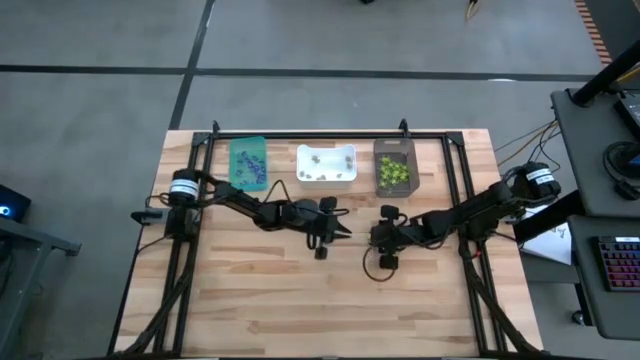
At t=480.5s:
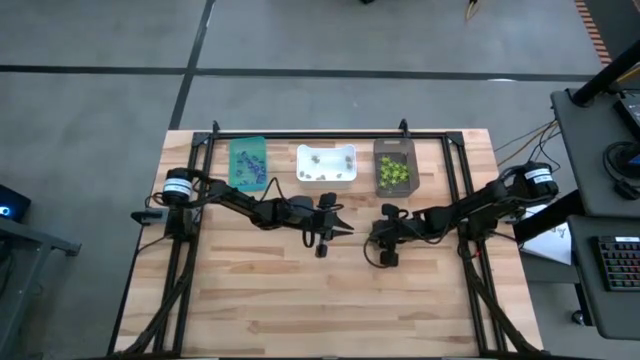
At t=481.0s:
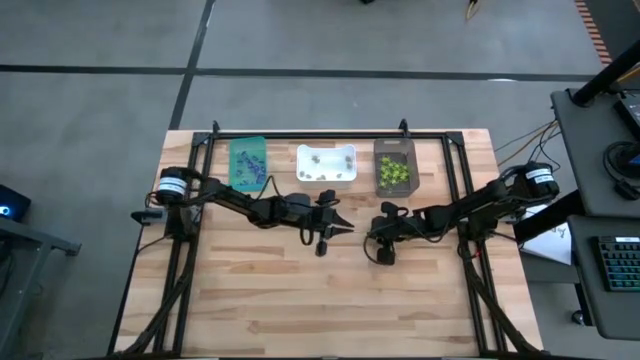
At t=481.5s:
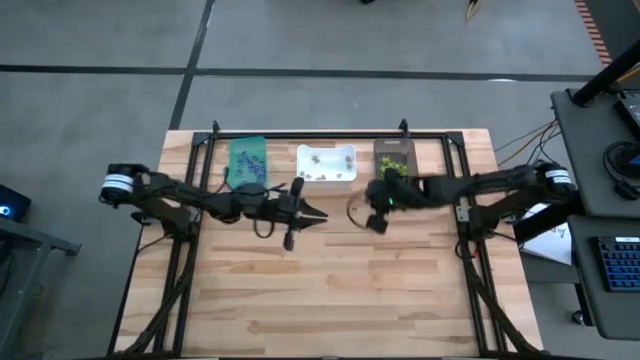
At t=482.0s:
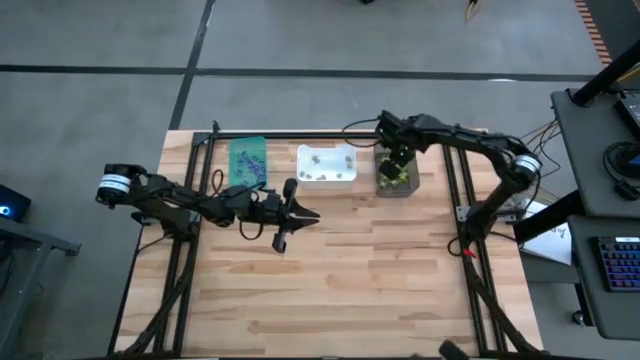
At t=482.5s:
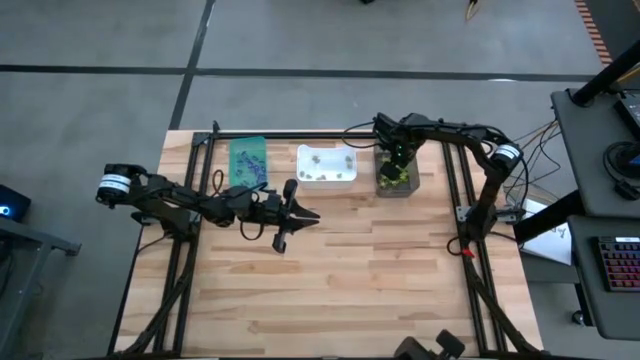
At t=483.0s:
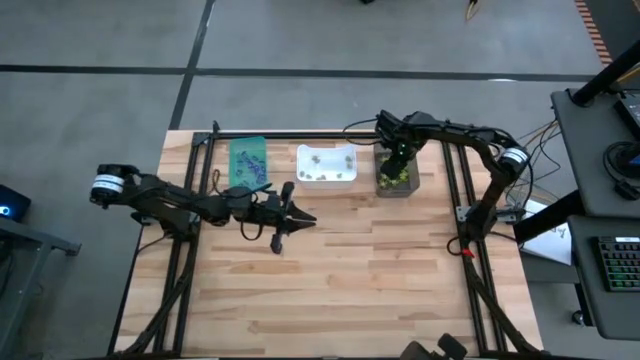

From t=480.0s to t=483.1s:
Task: Sort Halloween decoration
Put the green spider toy into the black bin

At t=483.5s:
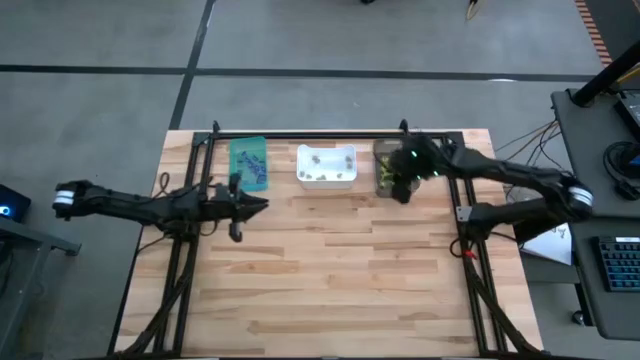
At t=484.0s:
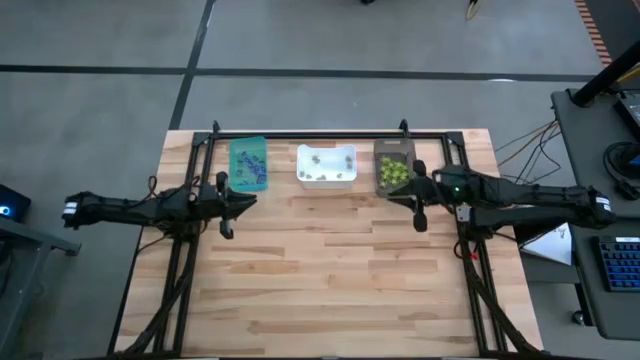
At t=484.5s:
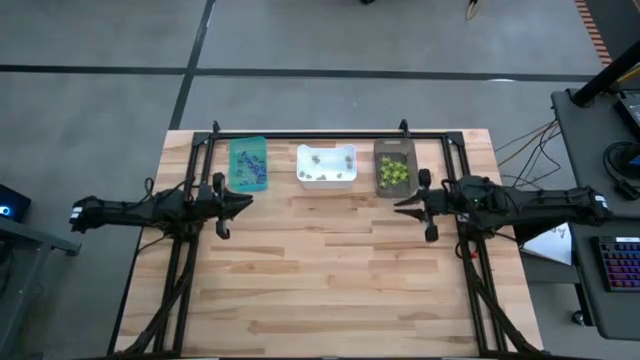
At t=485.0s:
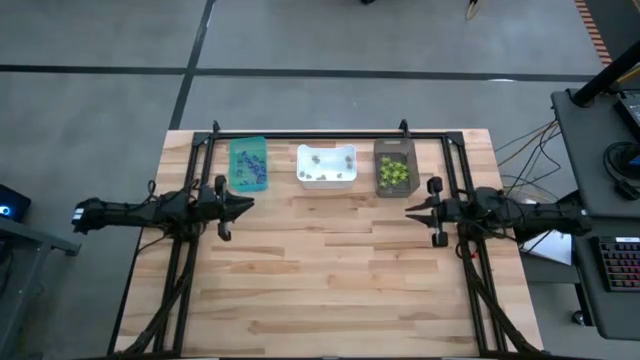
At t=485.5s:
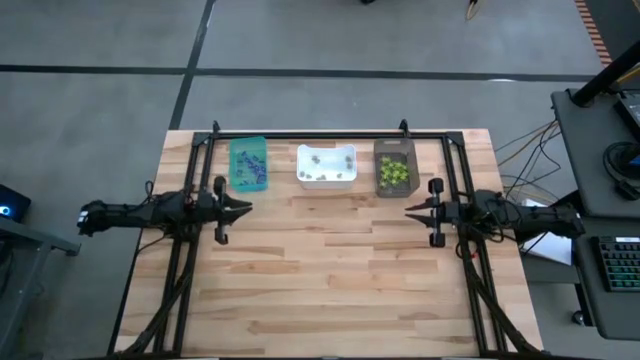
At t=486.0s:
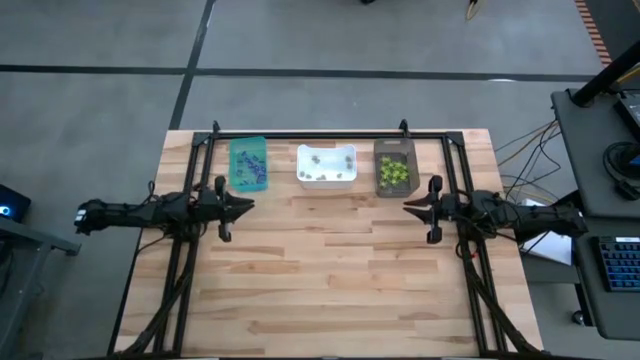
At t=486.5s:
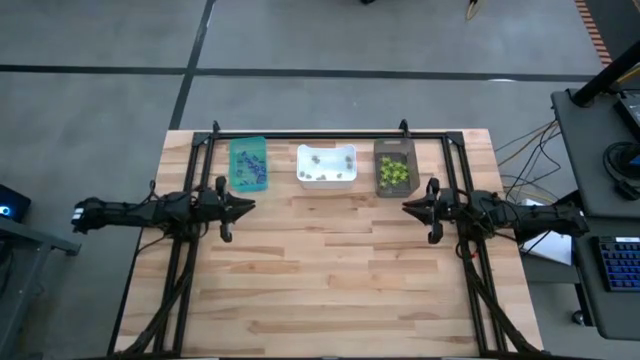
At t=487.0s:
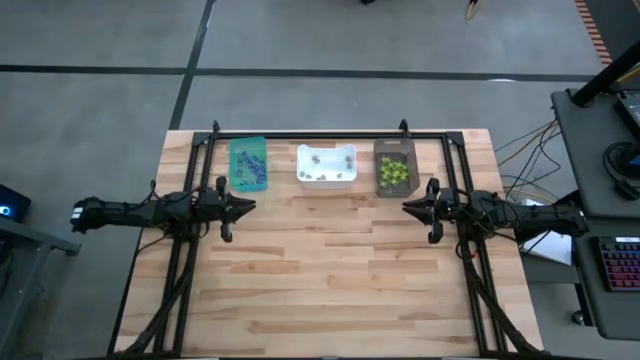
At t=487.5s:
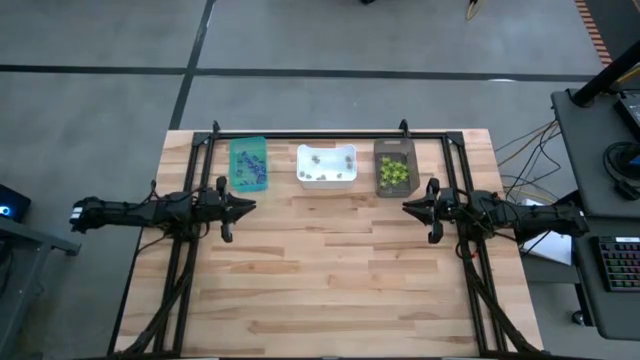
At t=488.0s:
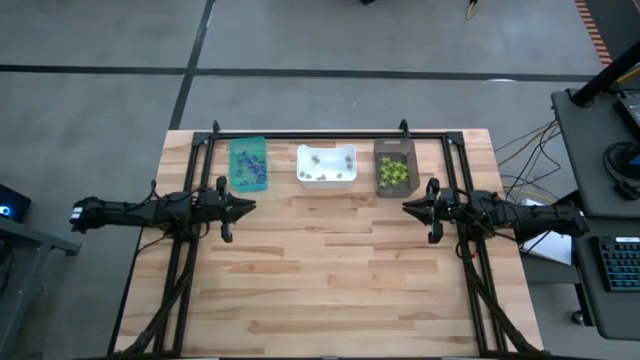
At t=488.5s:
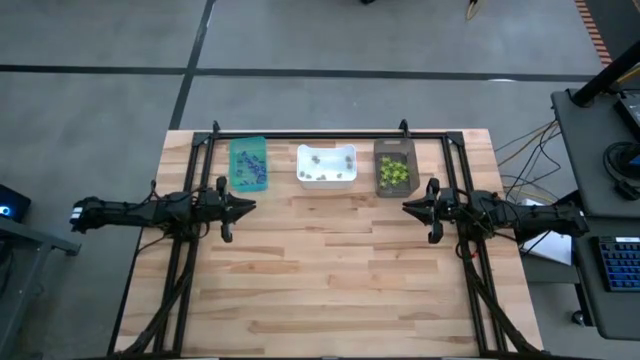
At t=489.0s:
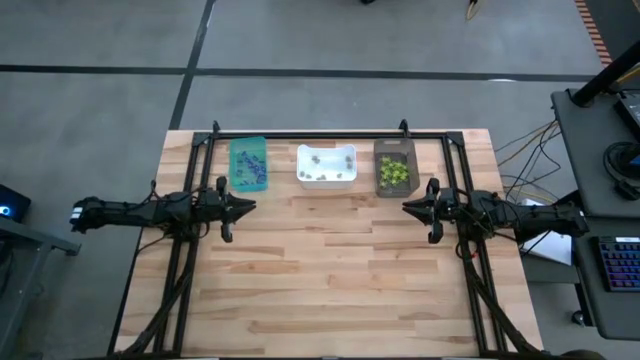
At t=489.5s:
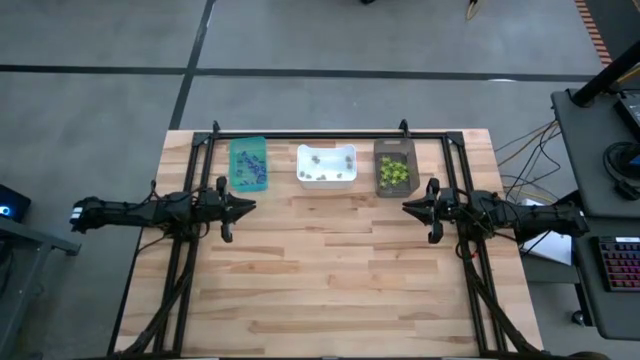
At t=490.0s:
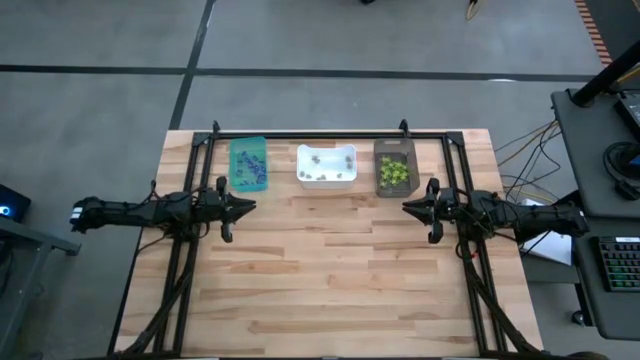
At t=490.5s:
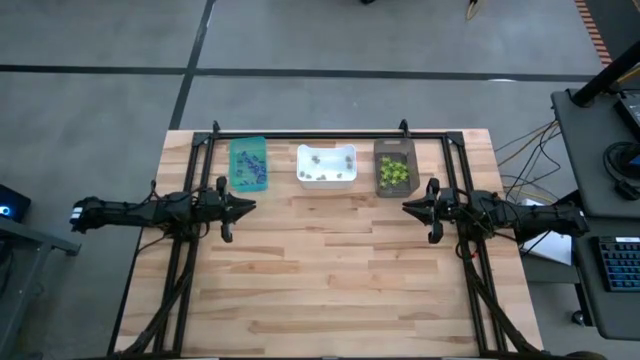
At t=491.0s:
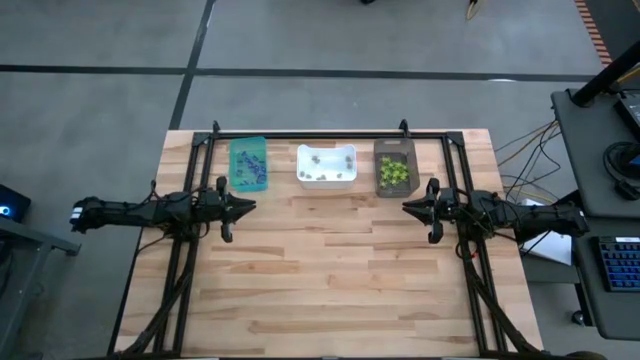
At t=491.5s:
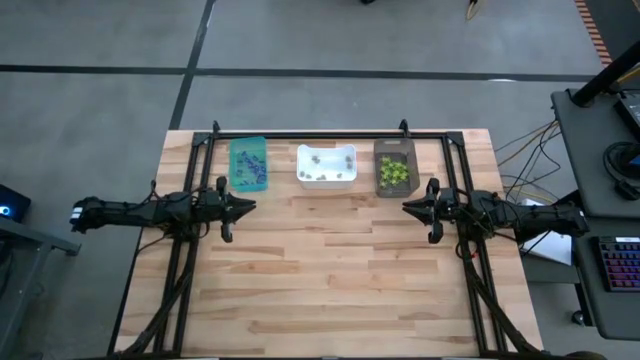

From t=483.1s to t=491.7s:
Return to Home Position

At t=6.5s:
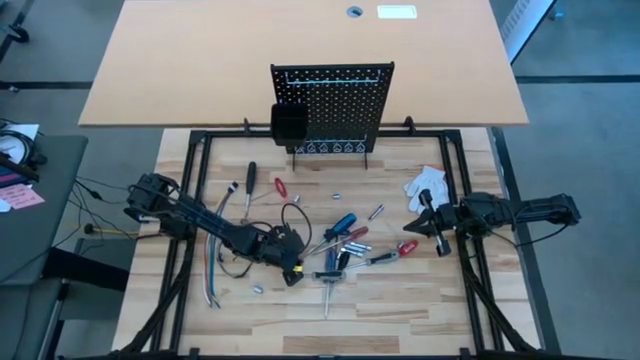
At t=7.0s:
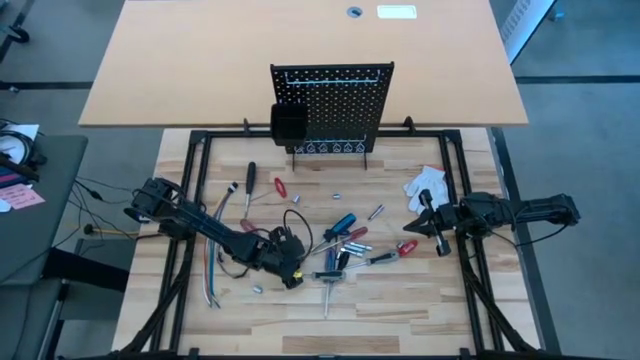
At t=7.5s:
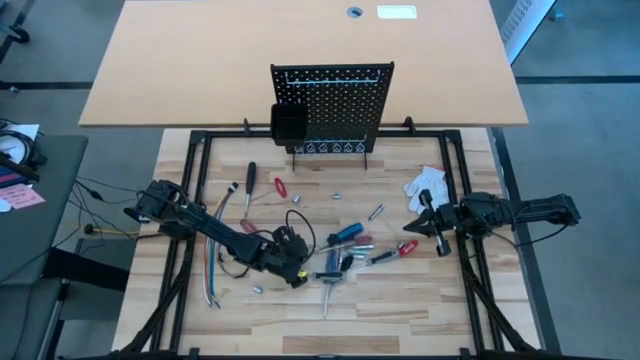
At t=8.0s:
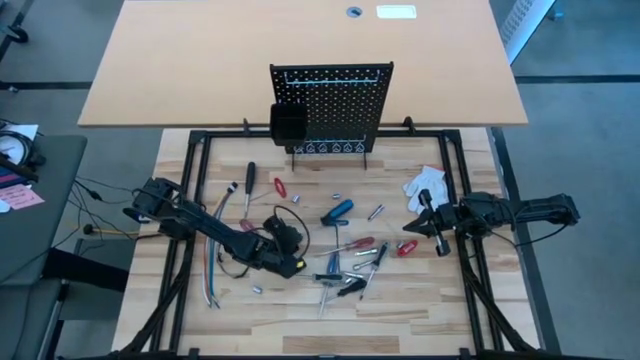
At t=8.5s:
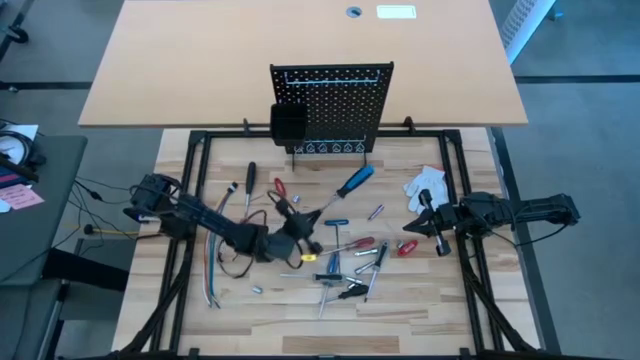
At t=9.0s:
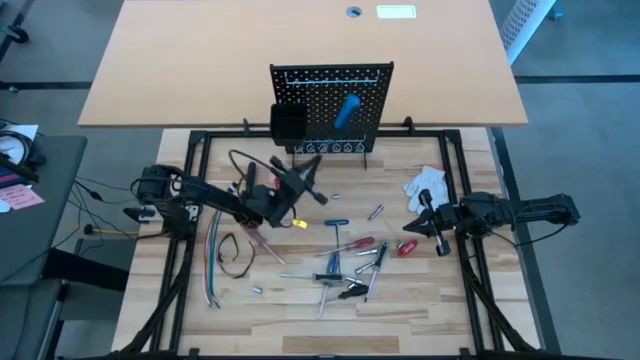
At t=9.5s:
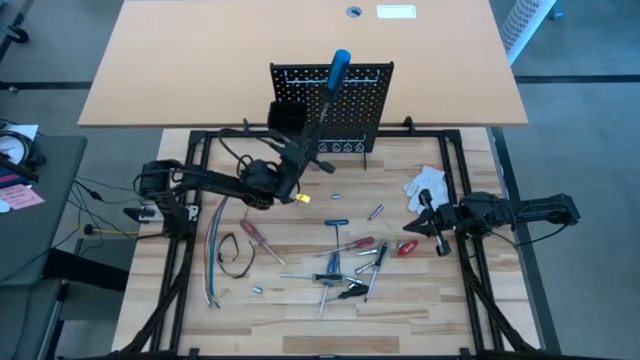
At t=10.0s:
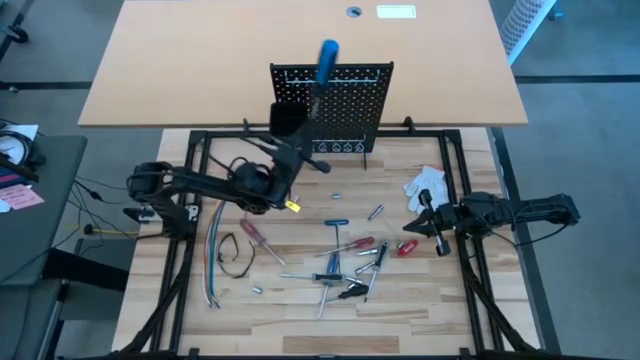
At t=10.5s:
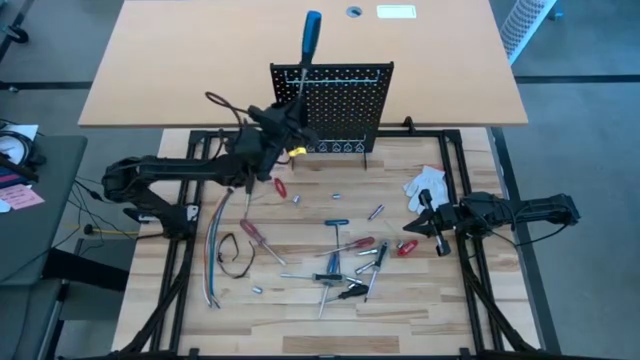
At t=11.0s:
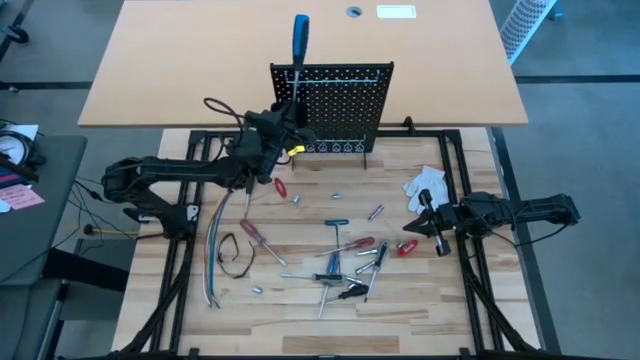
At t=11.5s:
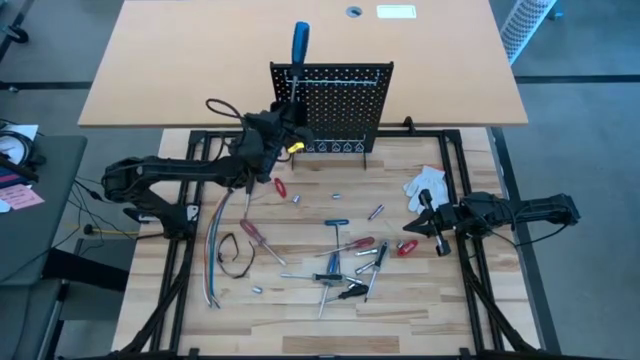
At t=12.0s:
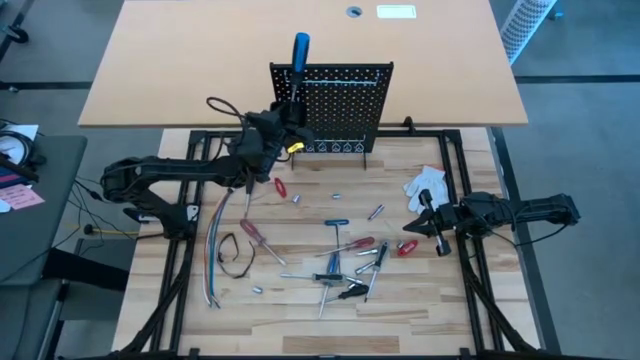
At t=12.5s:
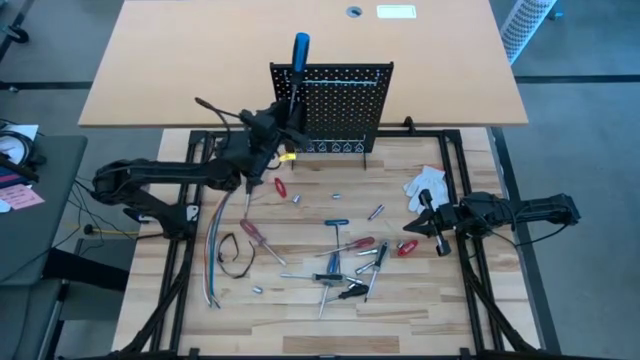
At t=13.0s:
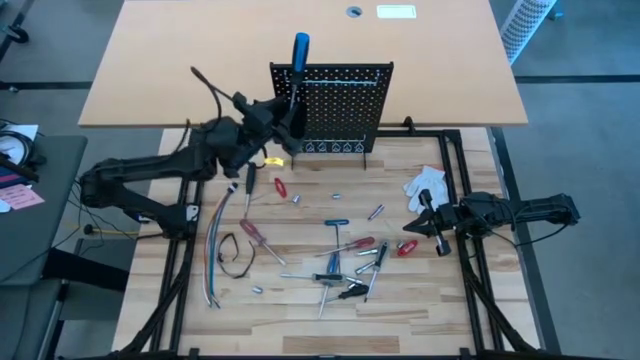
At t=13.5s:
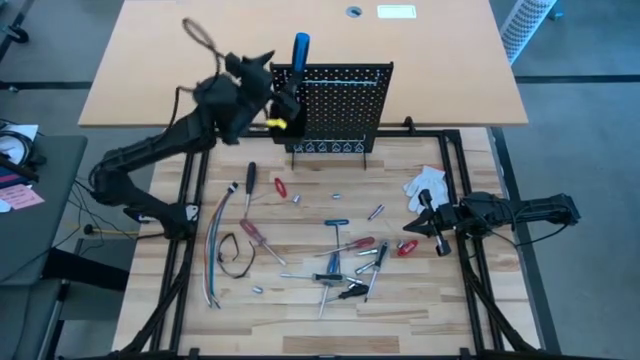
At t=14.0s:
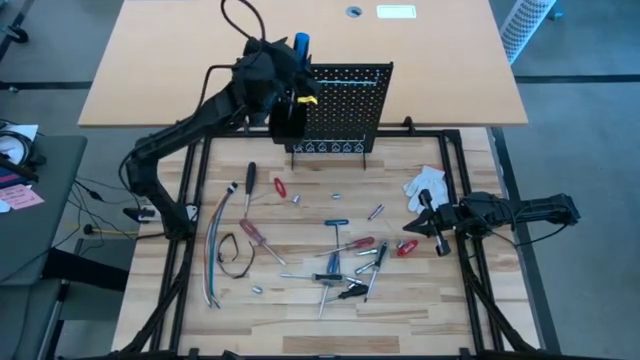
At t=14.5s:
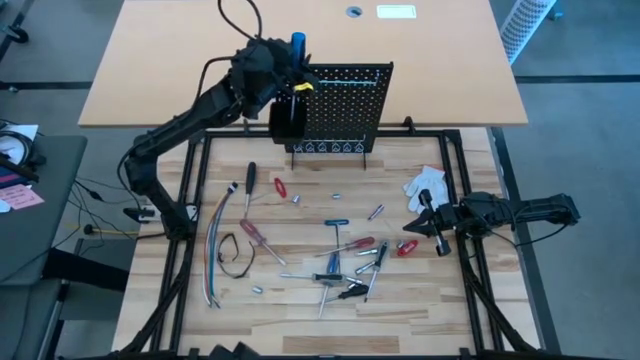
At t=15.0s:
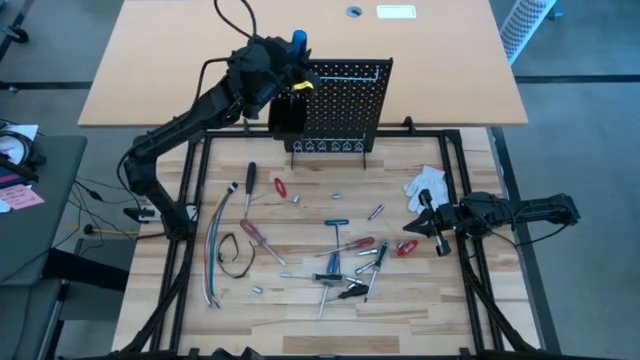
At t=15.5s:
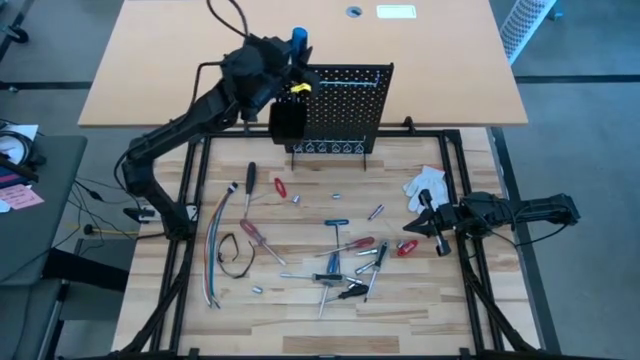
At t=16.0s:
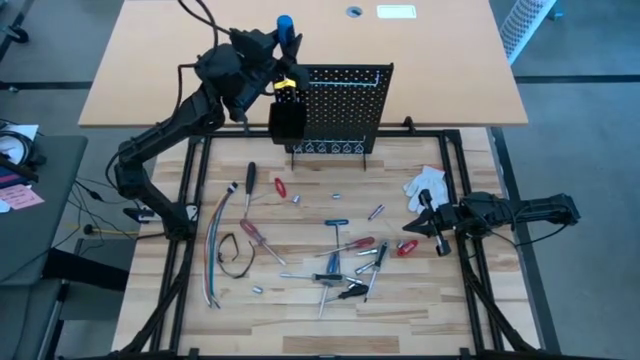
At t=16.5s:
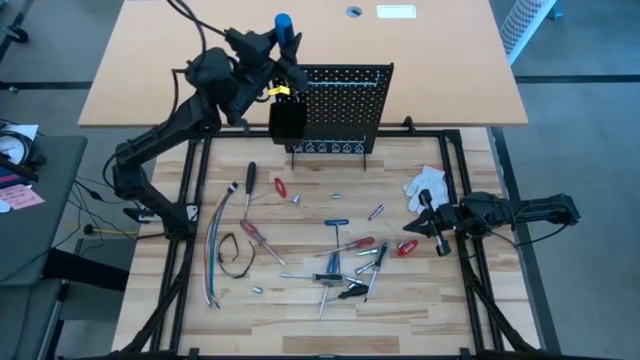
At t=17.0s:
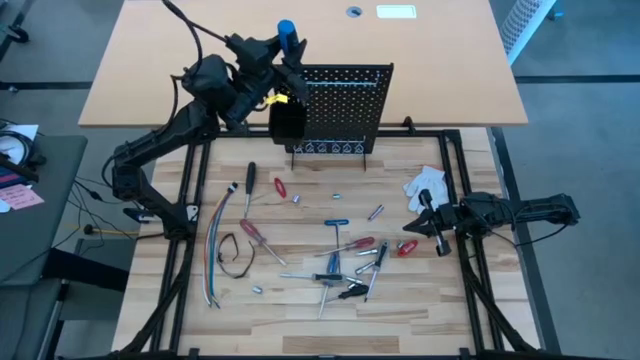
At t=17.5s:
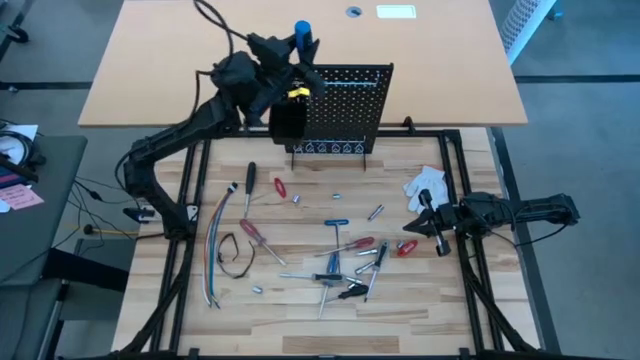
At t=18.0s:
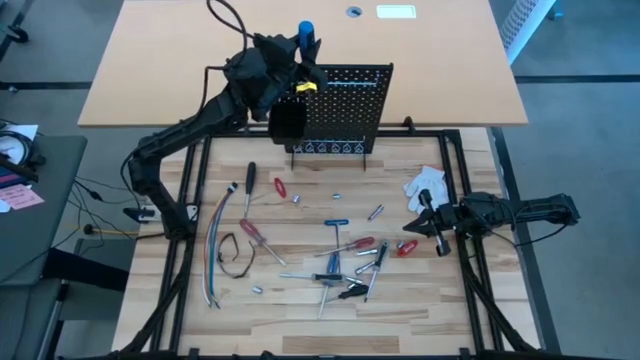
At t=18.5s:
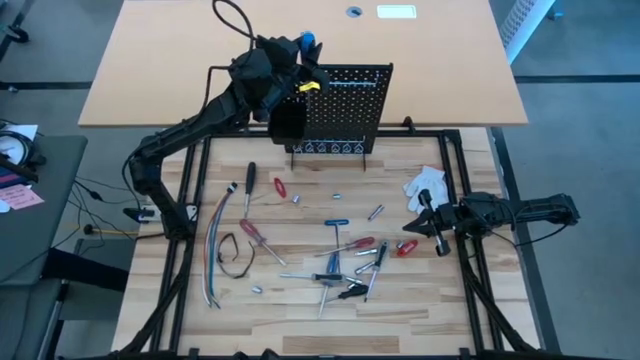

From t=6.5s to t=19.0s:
Task: Hang tools onto peg board
Hang the black screwdriver on the black pegboard
